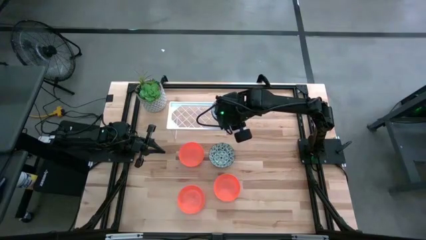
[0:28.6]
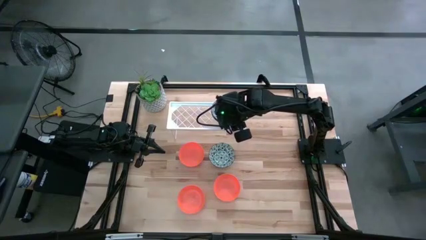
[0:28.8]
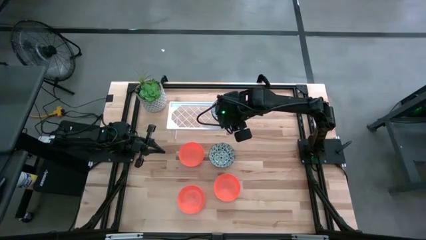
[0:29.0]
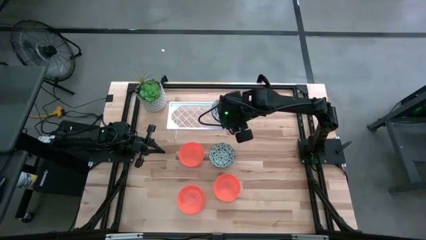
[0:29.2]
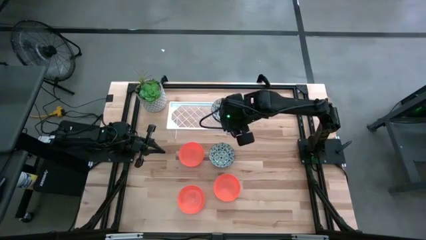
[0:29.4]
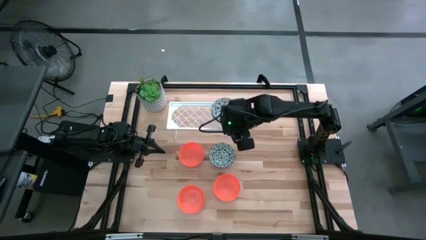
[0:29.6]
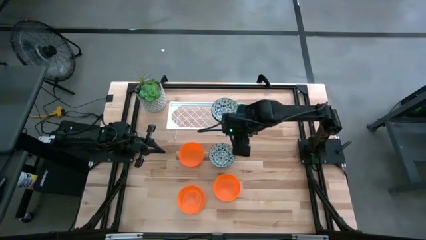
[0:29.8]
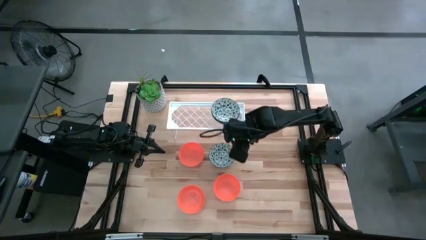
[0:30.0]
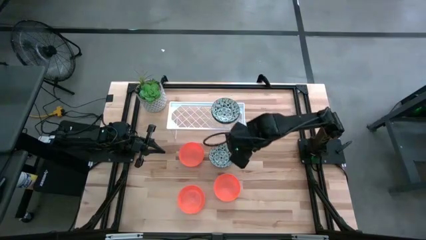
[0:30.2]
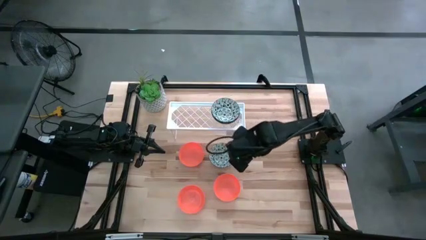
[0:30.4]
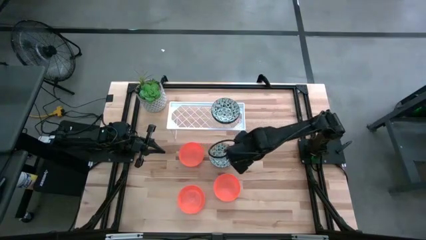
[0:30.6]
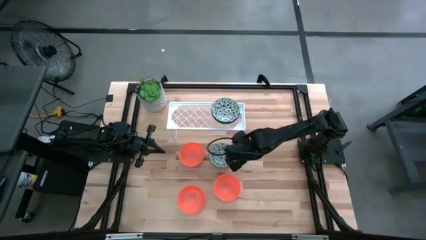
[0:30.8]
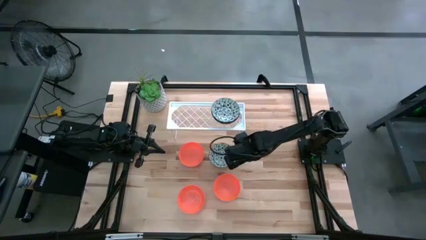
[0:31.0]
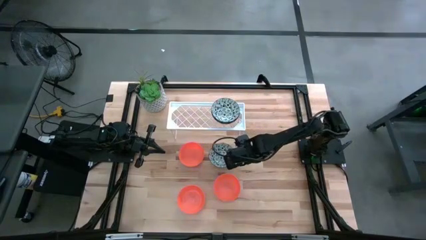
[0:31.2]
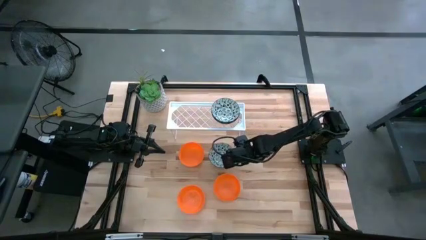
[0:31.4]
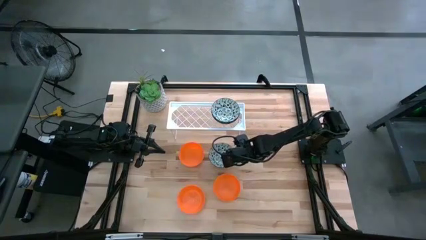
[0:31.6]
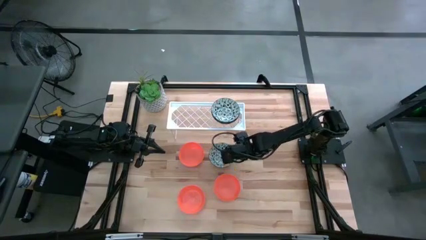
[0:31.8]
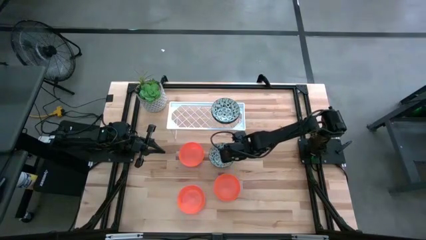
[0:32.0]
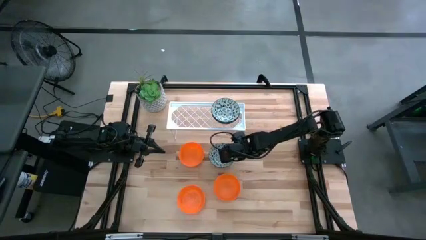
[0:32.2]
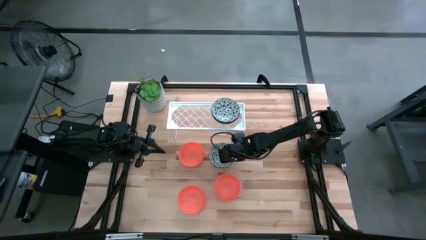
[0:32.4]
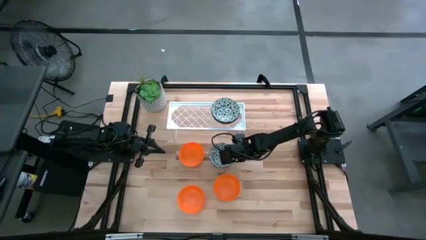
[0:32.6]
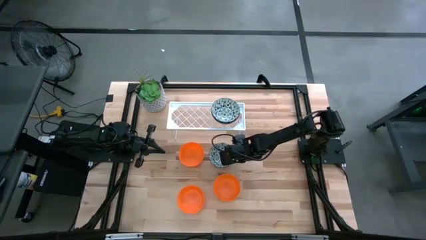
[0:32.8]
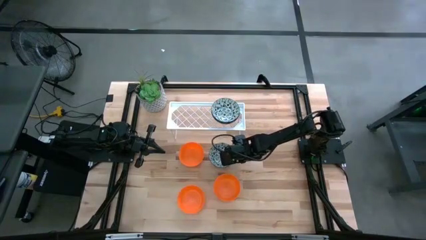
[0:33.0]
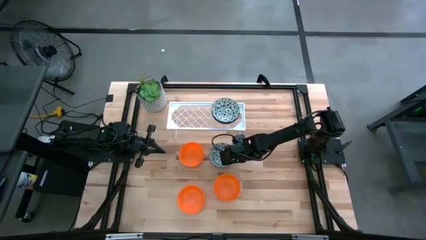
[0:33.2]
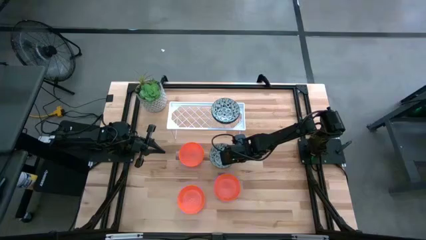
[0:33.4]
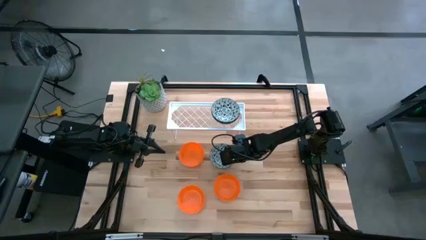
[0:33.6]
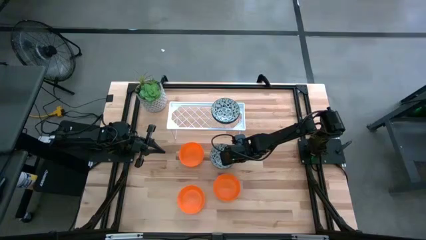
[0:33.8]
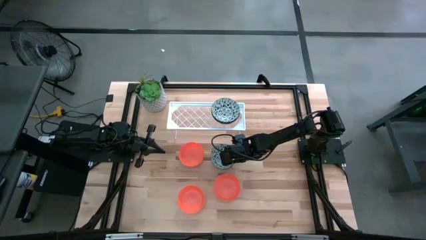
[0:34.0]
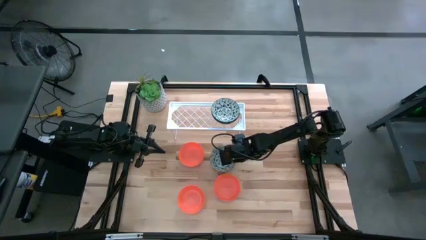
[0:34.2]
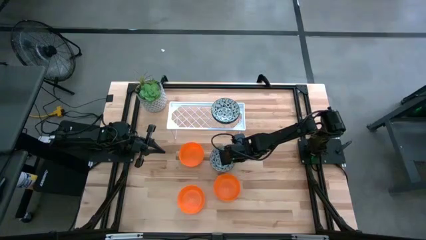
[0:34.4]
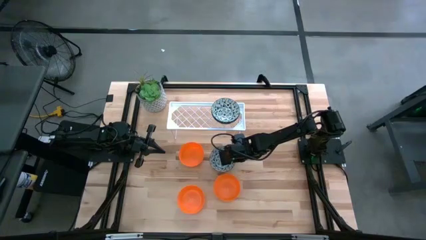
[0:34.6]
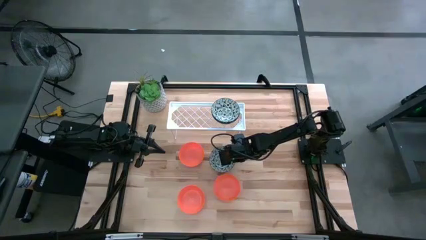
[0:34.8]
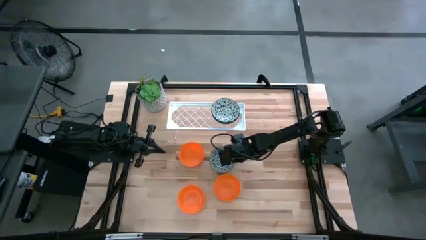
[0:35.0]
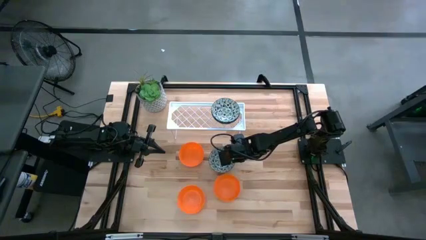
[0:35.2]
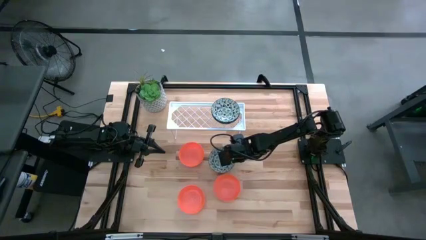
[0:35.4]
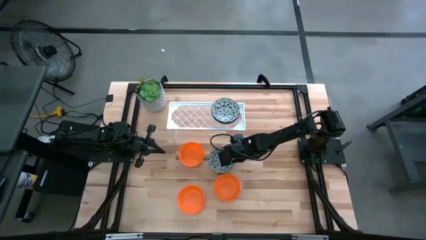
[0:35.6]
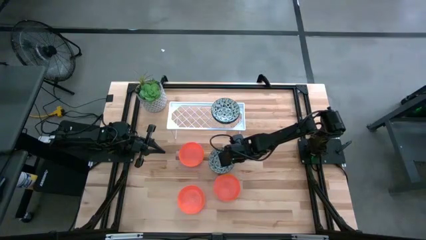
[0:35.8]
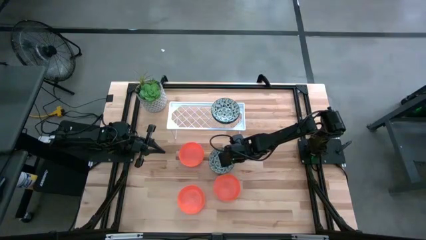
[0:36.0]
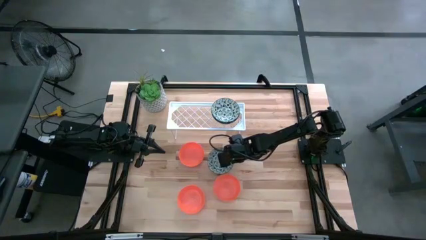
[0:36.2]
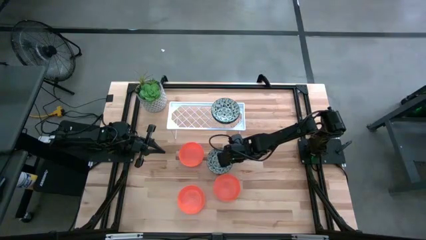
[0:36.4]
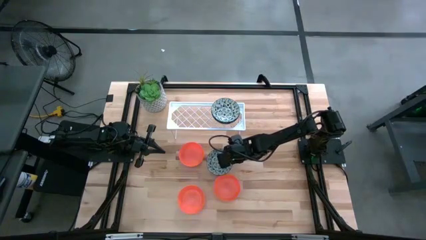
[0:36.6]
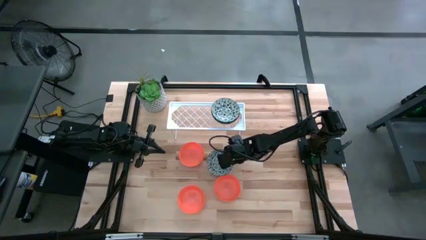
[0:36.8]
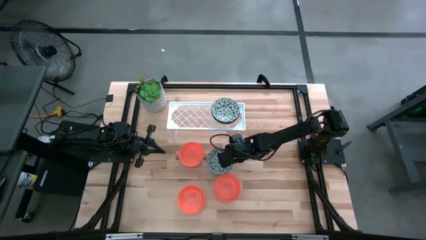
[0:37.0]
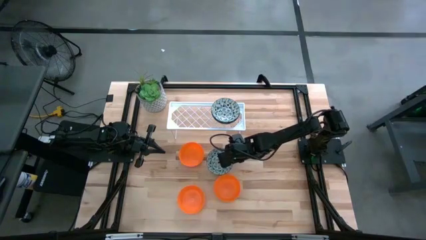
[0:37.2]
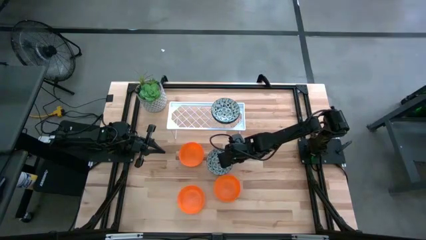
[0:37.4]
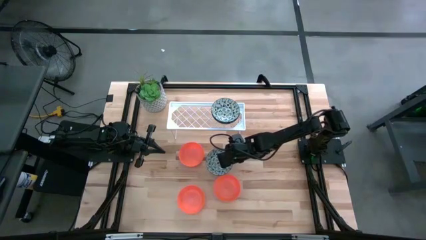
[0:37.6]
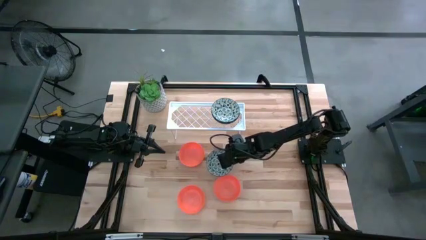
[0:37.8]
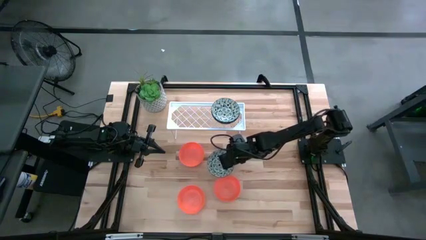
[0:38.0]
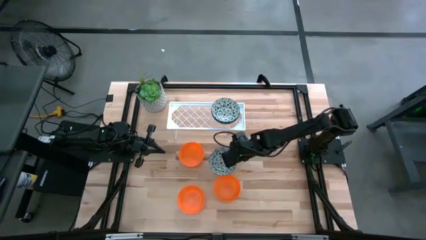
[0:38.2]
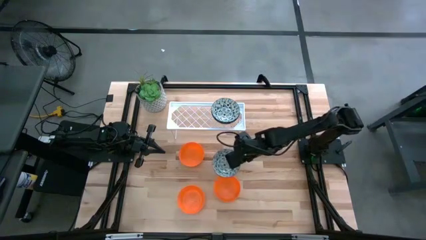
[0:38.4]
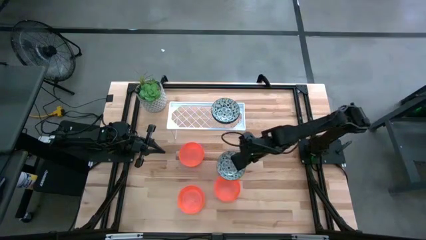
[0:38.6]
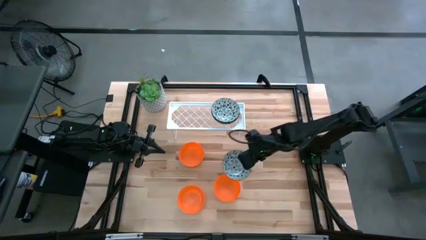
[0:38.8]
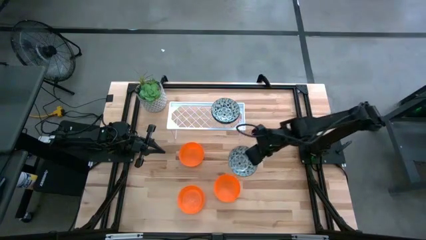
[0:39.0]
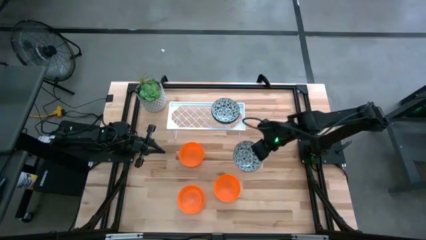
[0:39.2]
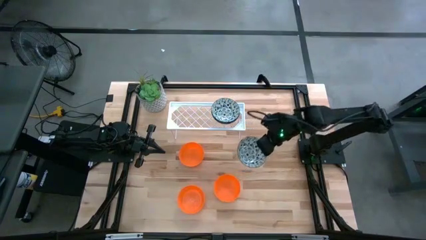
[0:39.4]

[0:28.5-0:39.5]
Task: Pick & Place Mini bowls
Stack the white patterned bowl on the white patterned bowl on the shelf
